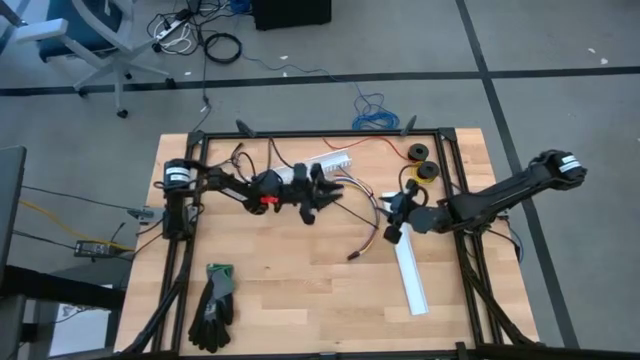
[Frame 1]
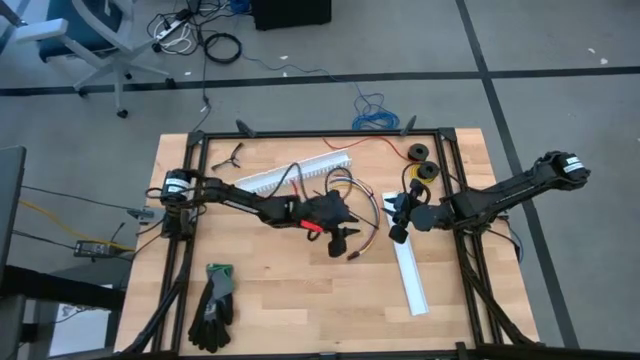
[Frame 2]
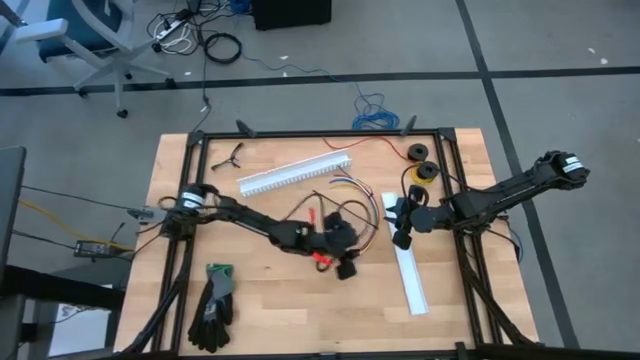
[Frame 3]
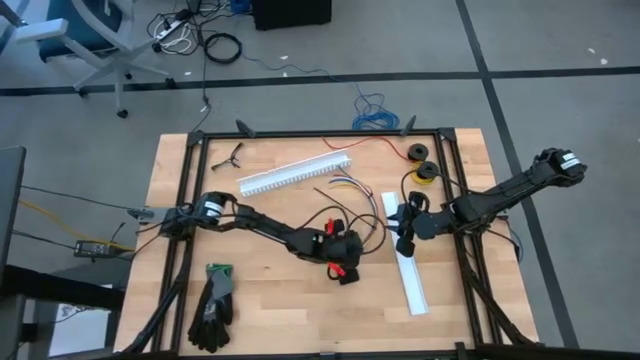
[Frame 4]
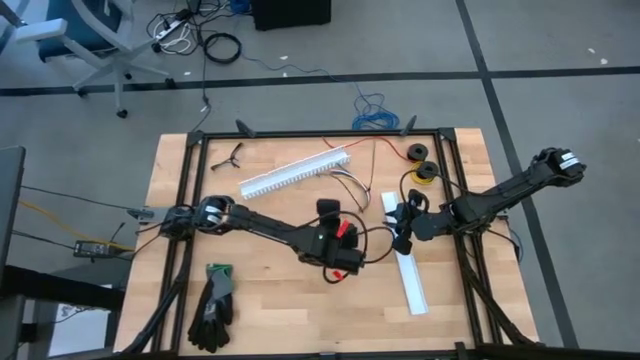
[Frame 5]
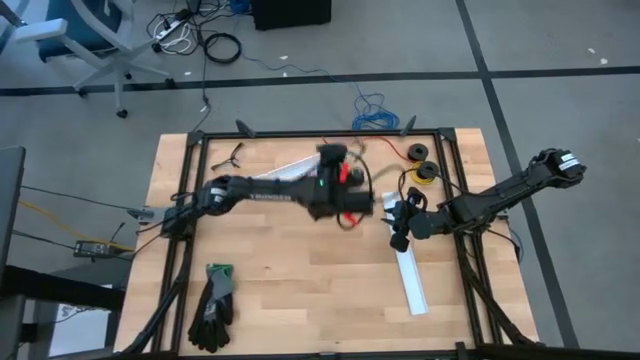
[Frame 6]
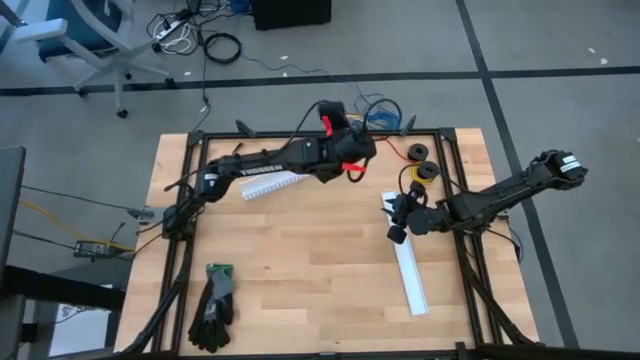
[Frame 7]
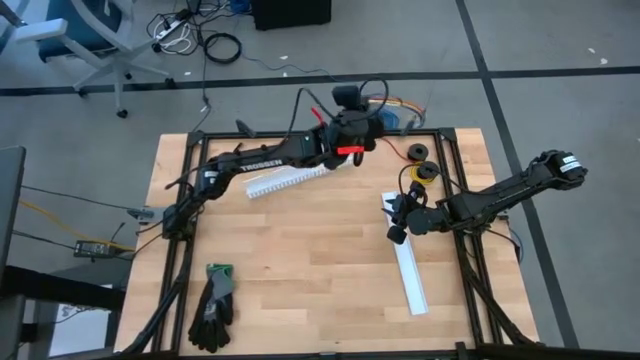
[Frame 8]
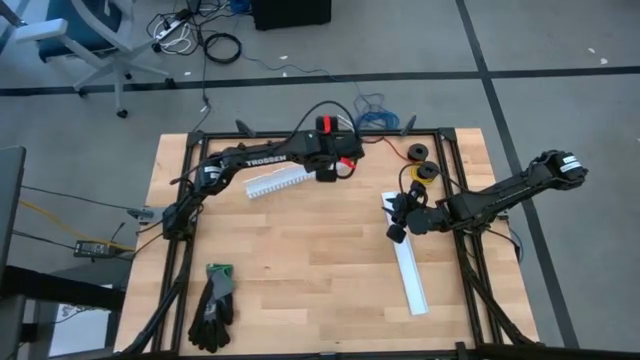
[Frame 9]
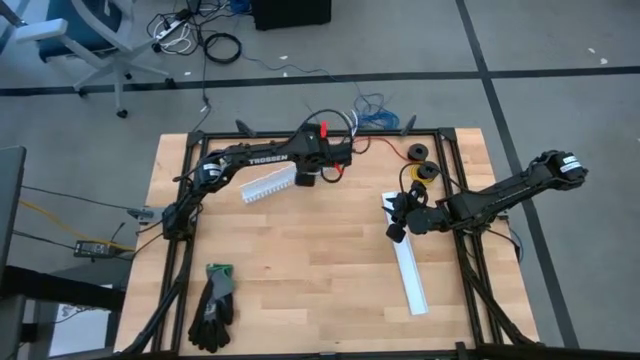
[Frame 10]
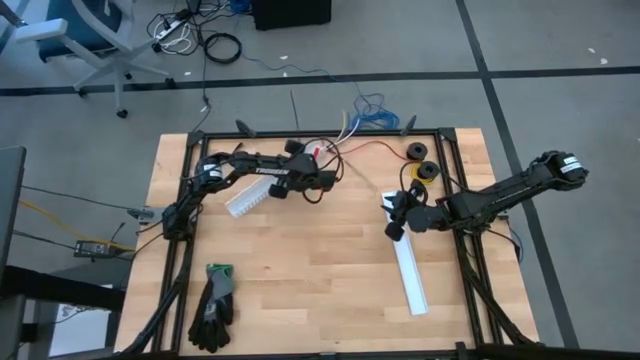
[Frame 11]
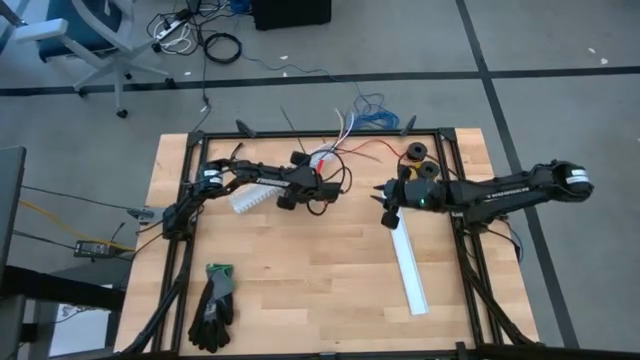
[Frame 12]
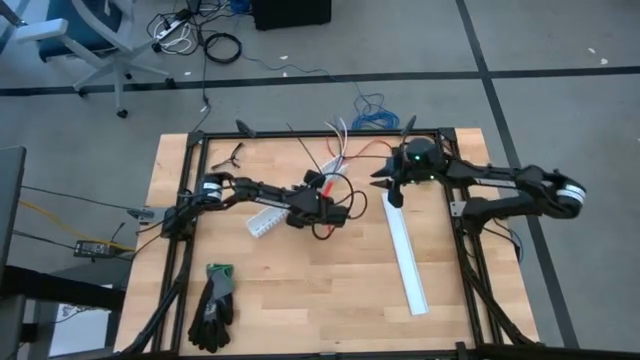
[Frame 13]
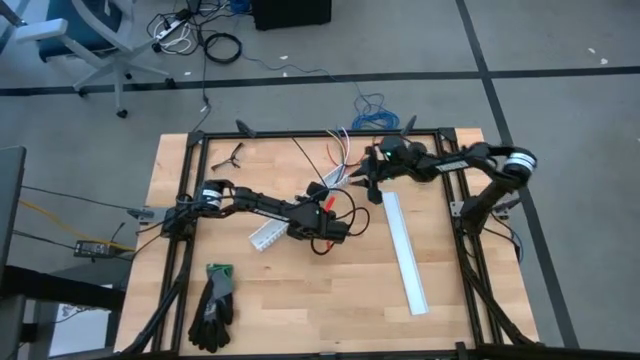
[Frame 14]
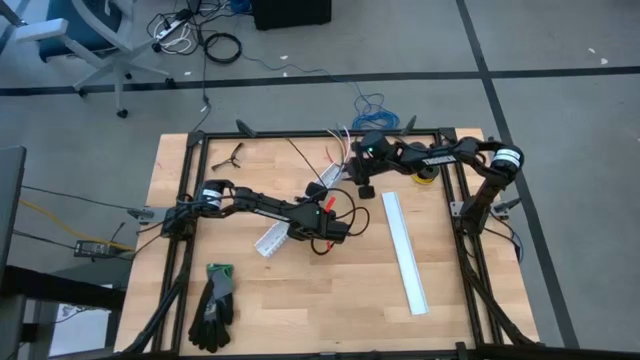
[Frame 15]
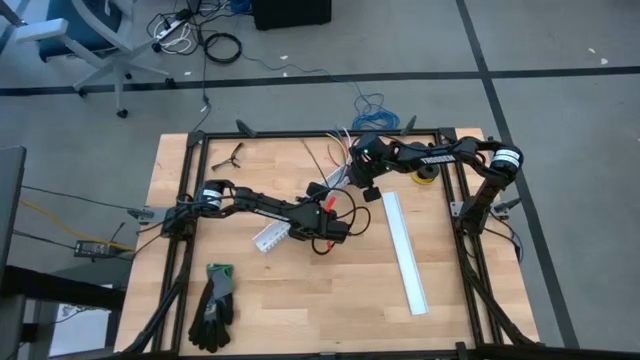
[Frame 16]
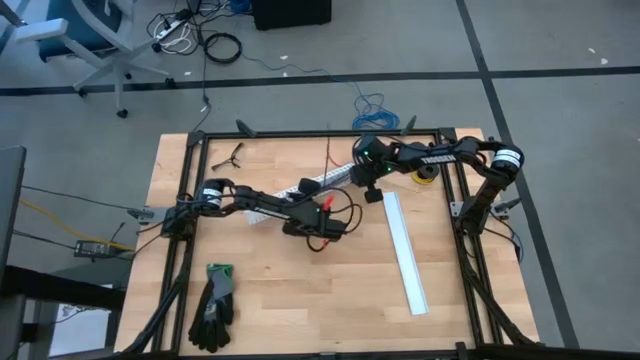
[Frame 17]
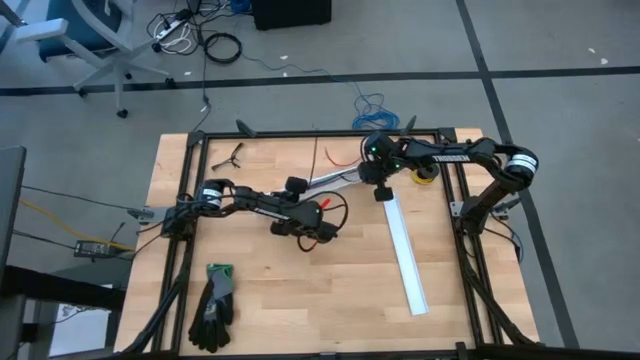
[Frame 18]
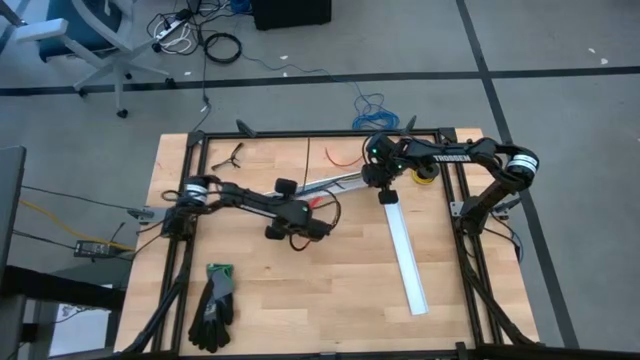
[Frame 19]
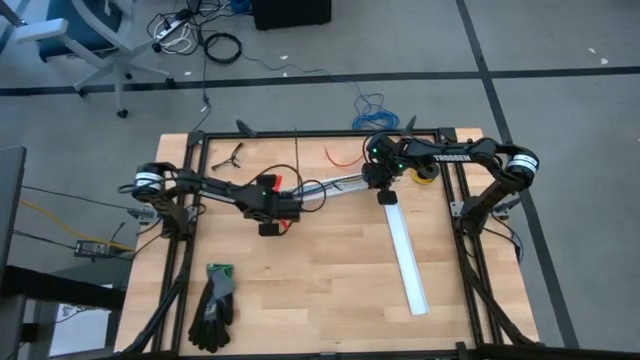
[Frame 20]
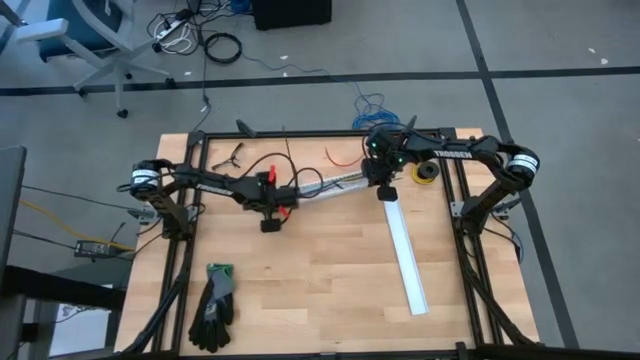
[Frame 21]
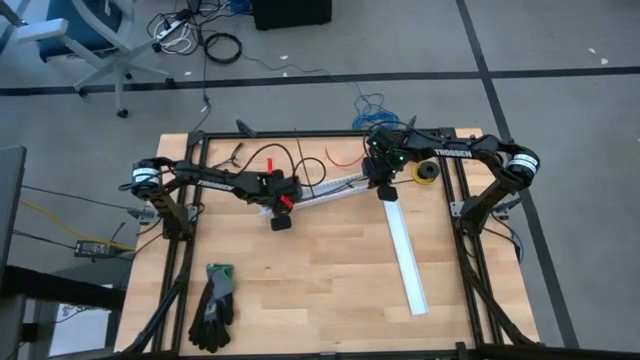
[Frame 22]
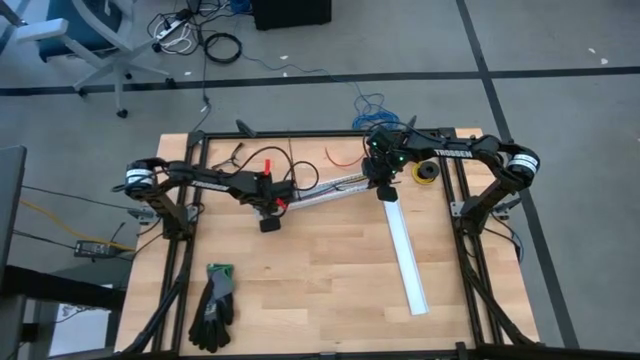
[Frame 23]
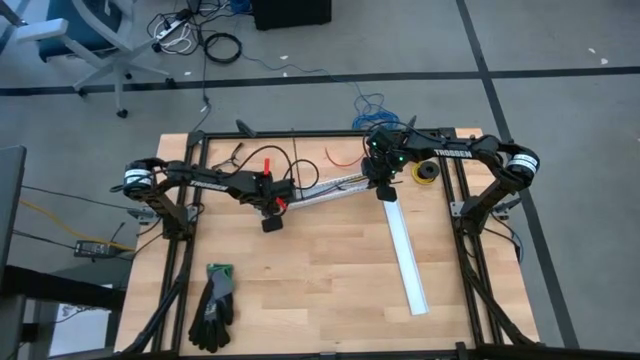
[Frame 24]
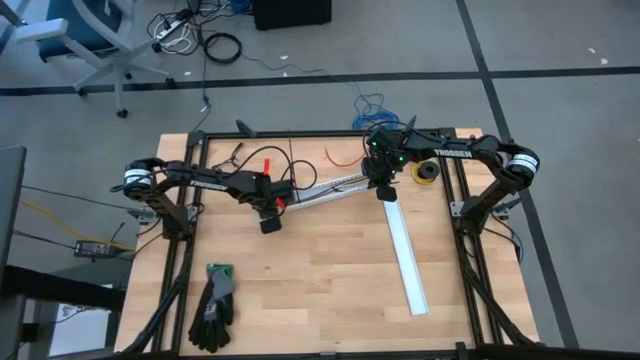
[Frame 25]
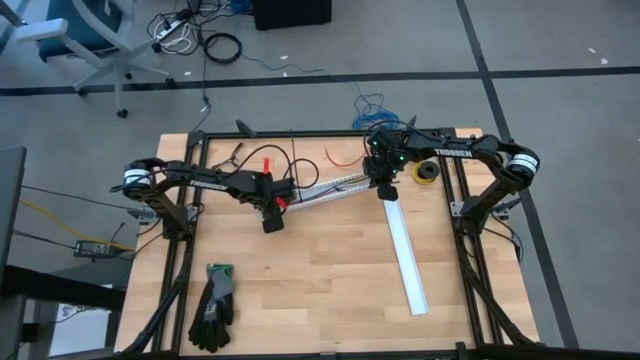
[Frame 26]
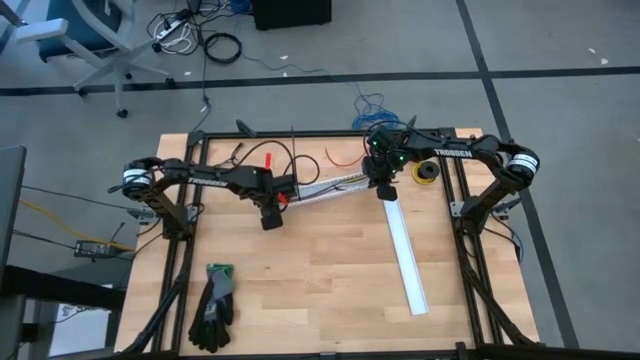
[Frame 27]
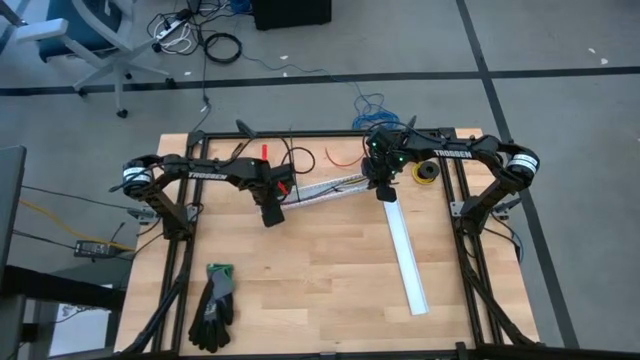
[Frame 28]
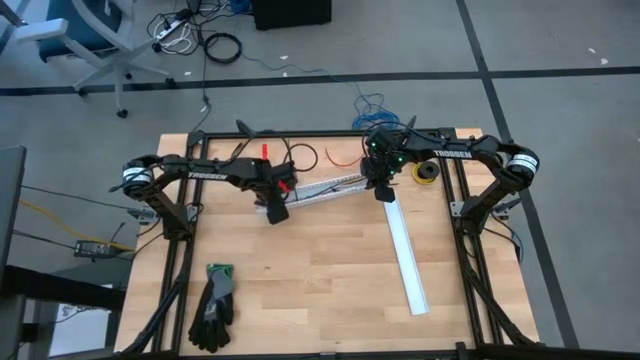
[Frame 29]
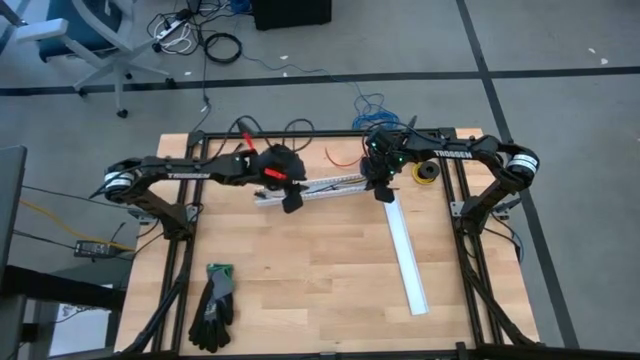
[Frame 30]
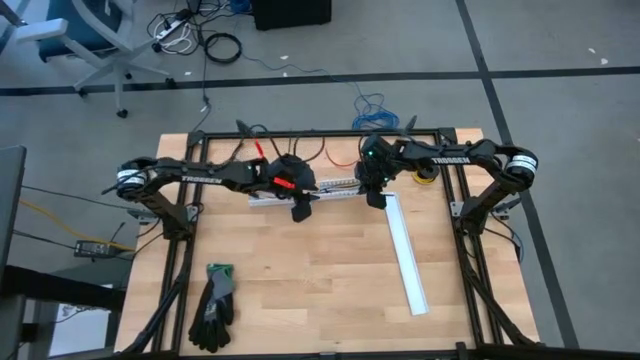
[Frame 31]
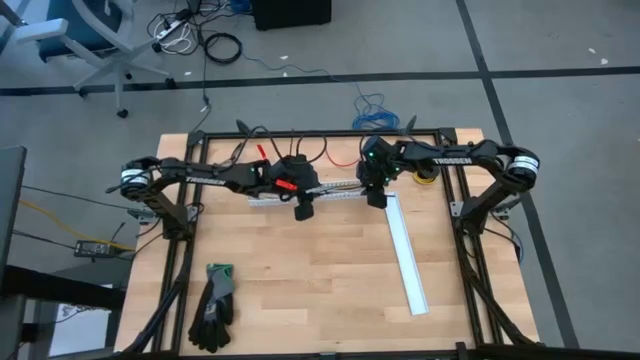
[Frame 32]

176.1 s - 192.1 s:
Task: Ziptie cables
Put the cable wires into the white cable duct

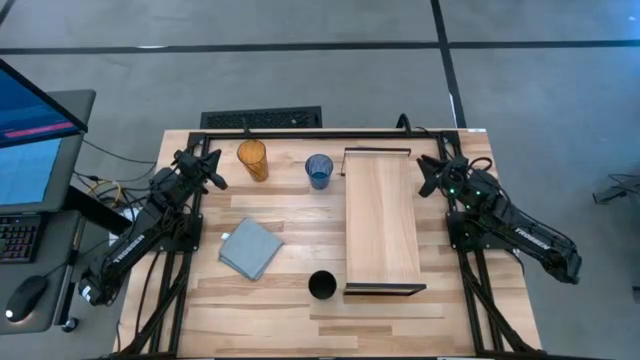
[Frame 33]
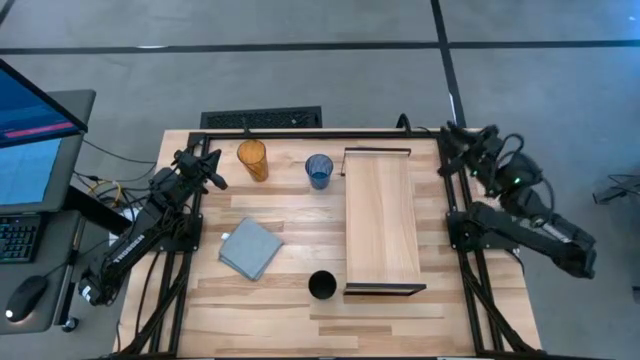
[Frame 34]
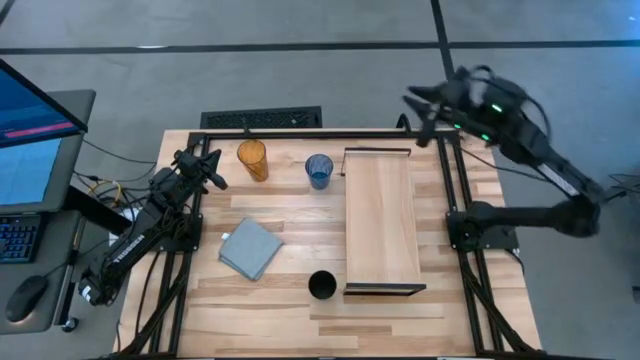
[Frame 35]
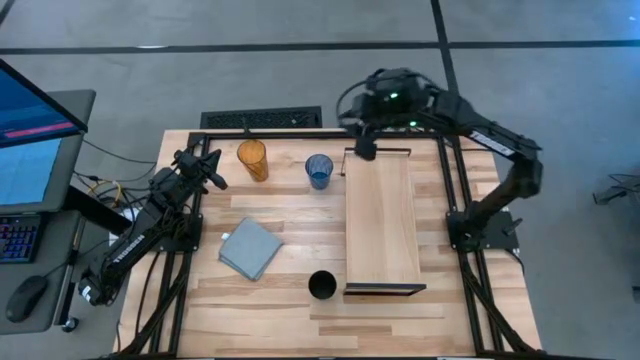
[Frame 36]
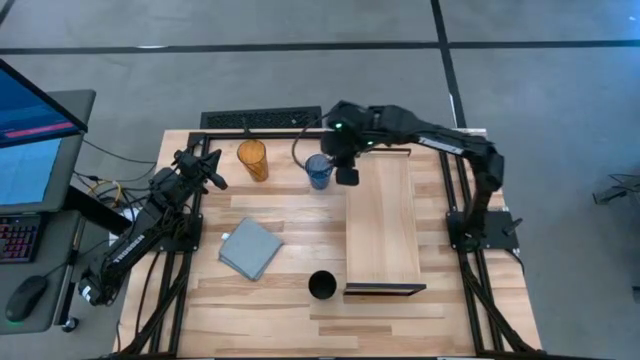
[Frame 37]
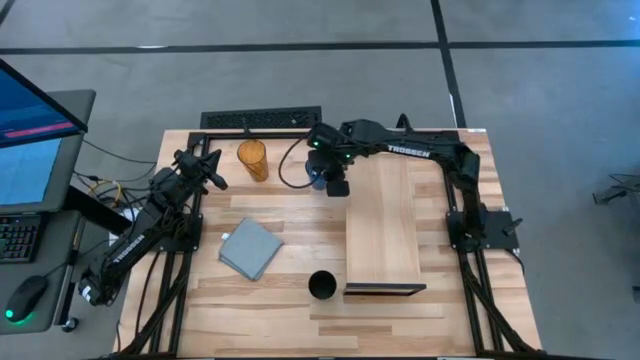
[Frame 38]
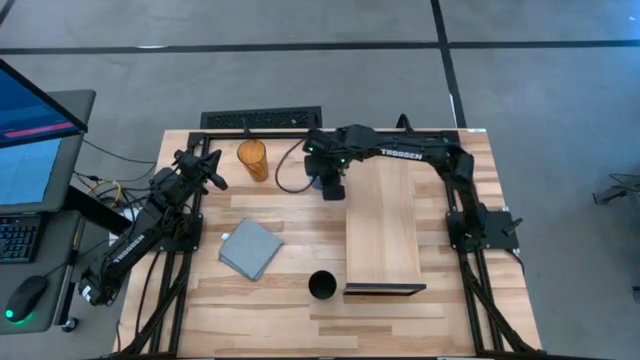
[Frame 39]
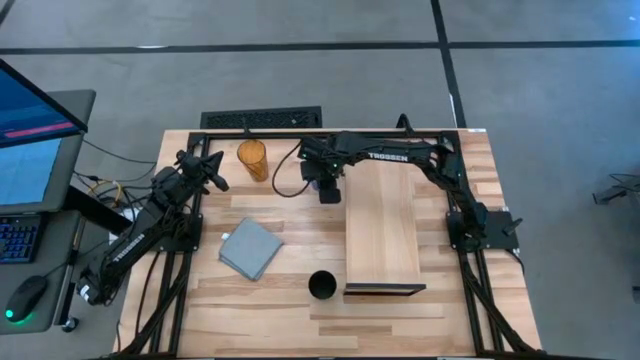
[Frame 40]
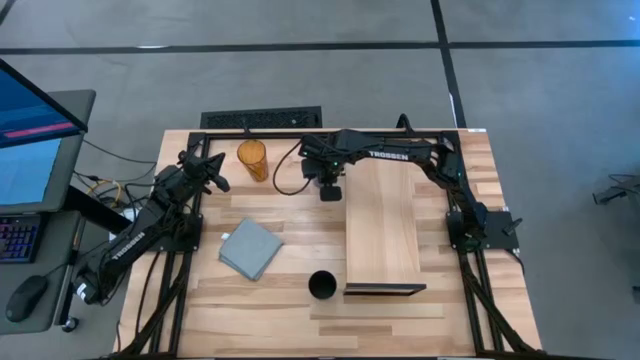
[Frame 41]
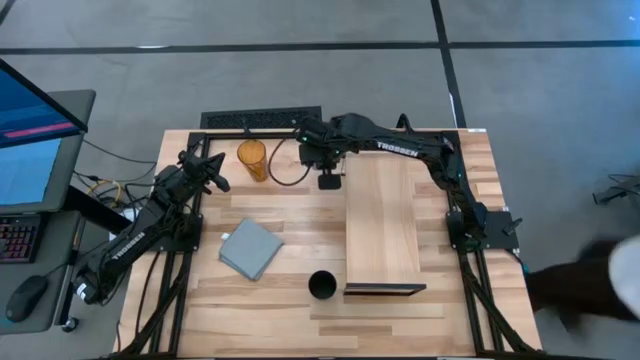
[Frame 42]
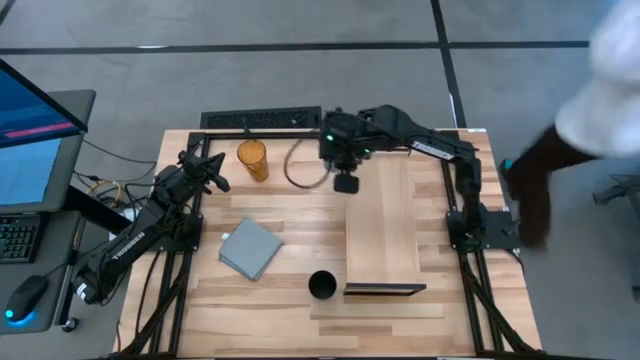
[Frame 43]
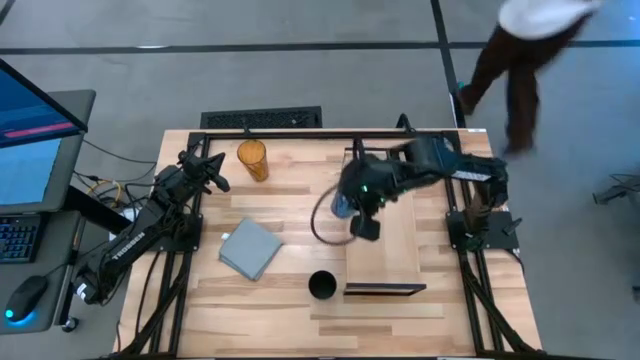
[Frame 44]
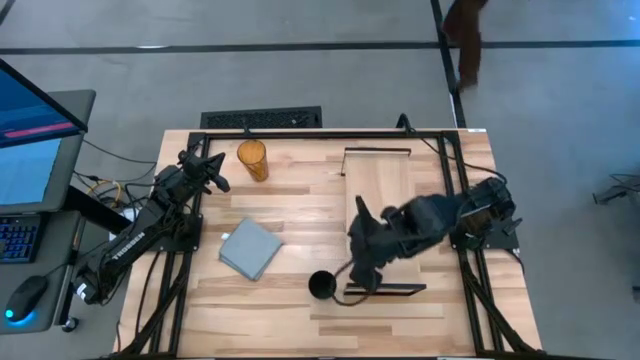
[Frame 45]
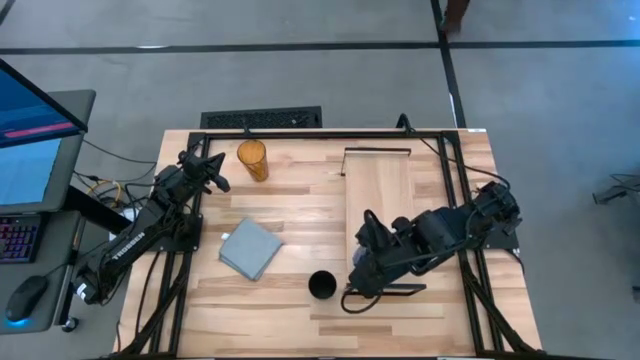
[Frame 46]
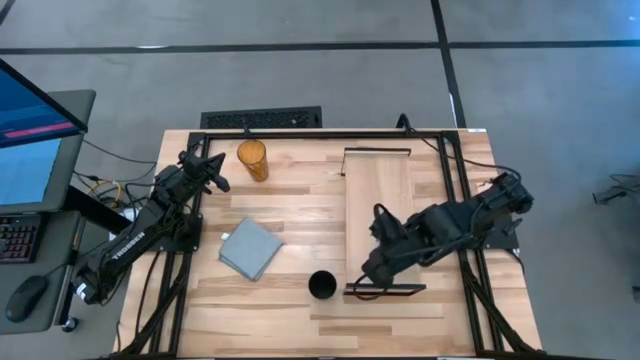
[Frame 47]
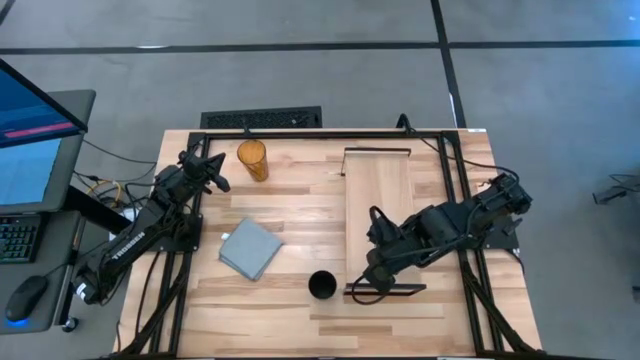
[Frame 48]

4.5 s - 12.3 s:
Task: Stack small to large cups/mugs on shelf
Put the blue cup on the shelf
